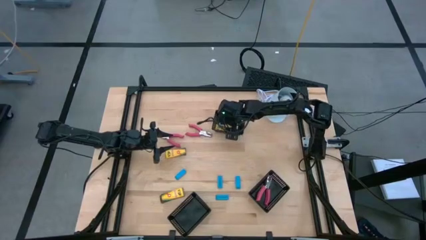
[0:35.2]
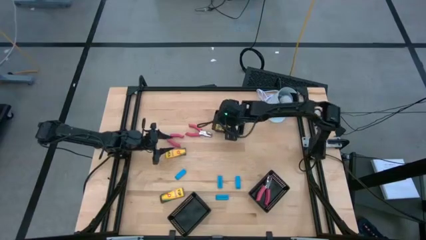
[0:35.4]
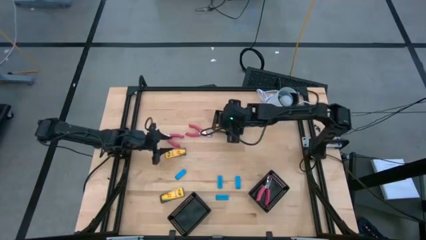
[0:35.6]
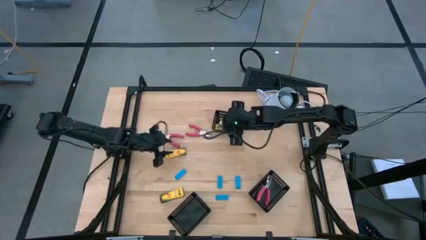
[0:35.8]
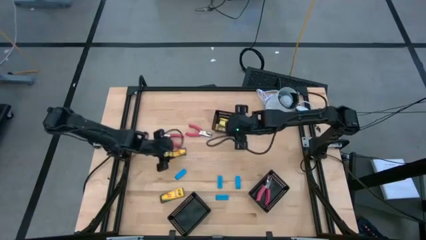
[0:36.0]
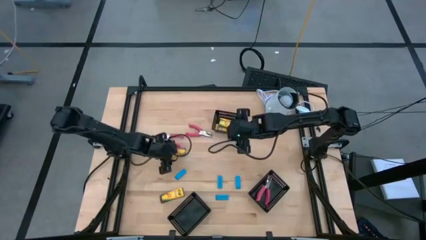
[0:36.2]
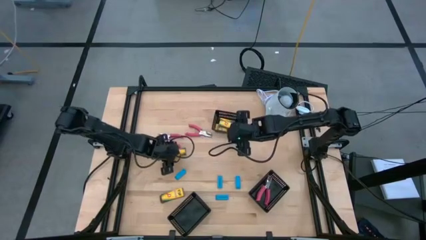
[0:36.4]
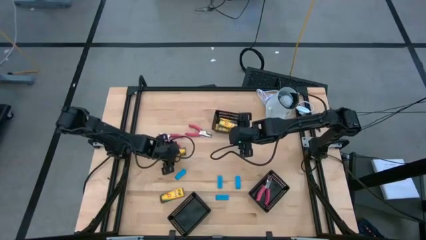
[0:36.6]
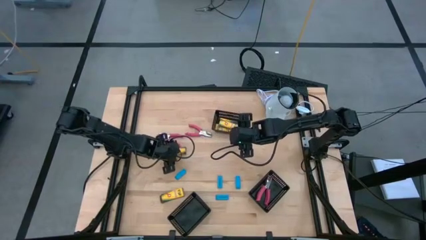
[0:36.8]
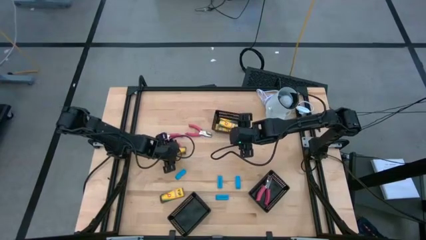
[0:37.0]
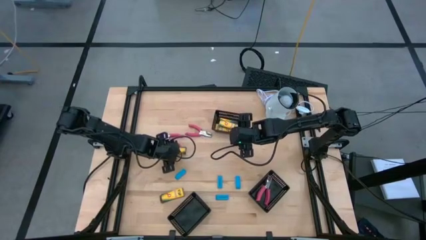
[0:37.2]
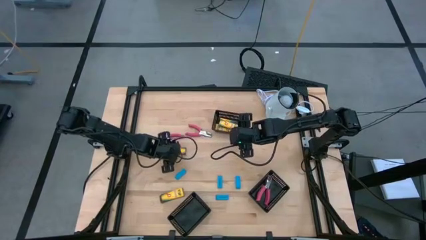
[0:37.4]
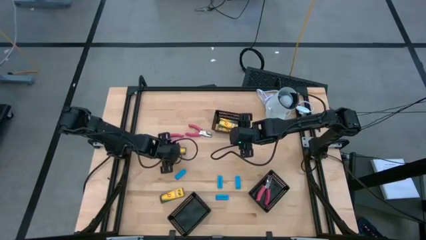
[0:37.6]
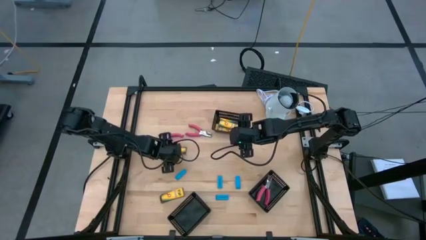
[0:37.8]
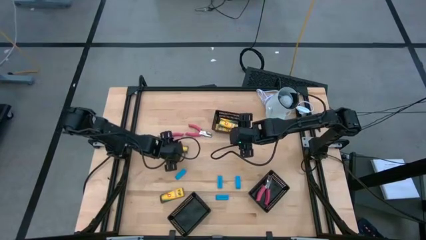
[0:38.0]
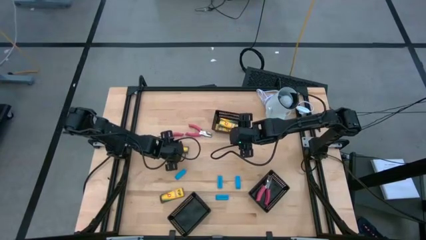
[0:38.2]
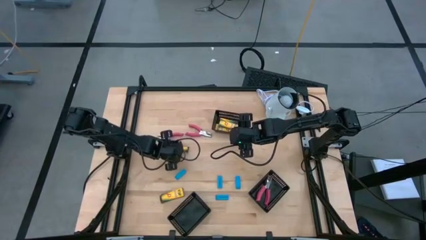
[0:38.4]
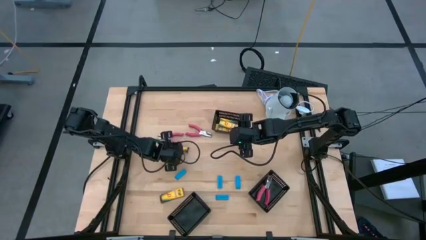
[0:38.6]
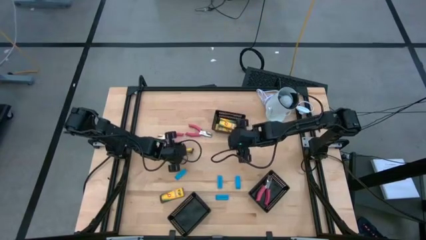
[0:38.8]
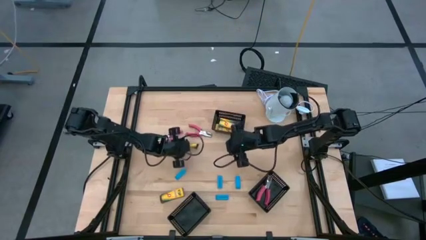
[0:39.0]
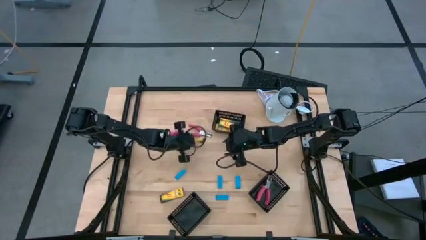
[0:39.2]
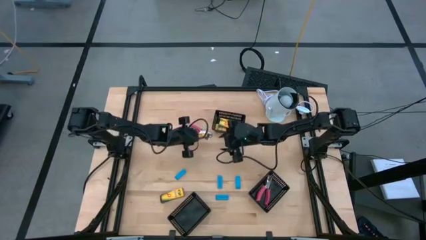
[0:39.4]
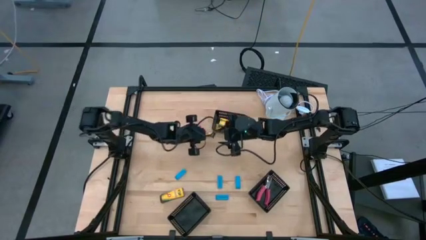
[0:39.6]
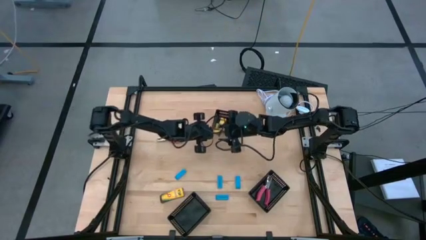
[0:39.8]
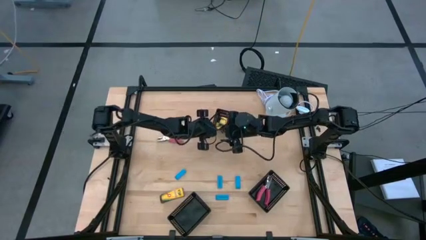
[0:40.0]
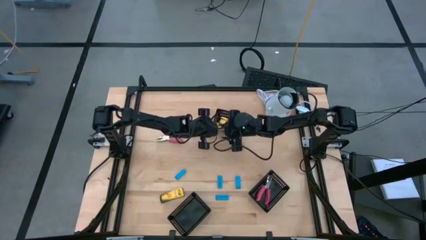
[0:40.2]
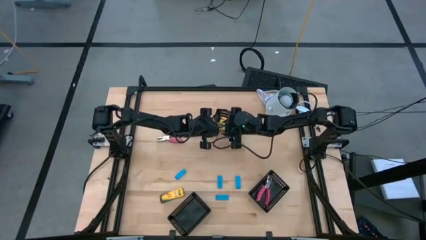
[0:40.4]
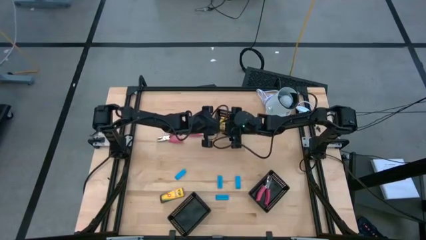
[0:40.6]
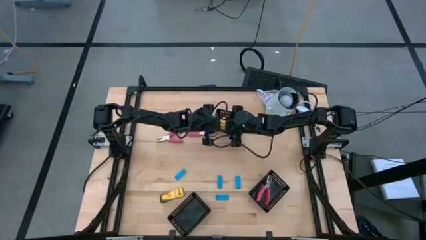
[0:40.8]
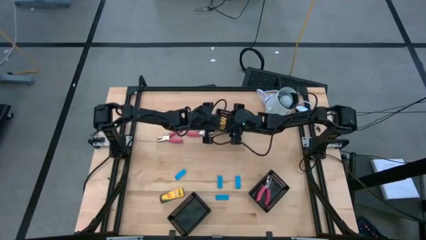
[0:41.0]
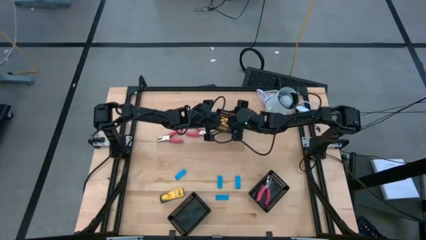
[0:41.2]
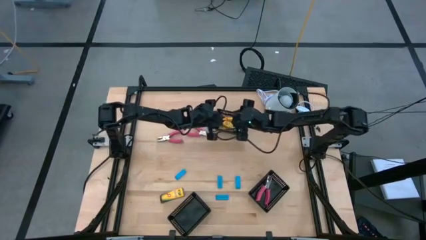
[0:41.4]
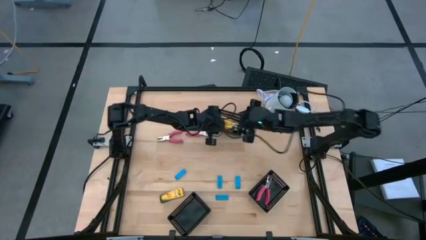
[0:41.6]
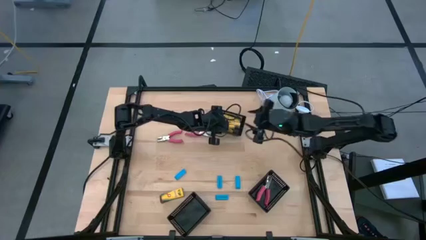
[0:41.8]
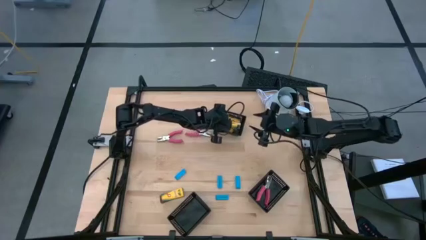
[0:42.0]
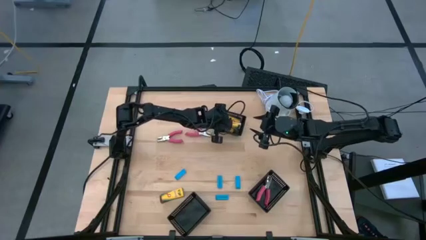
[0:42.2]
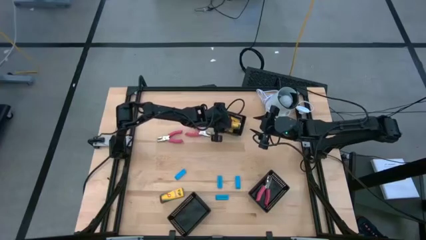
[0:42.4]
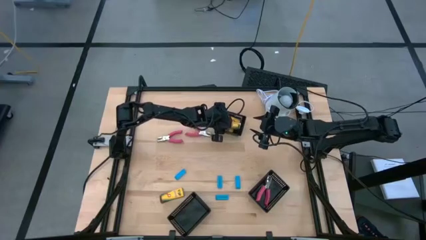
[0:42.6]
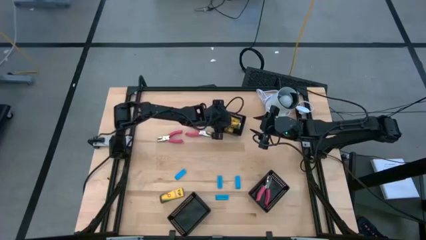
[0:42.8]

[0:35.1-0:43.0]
Task: Pick & Place School Supplies
Put the yellow crayon box into the top black bin

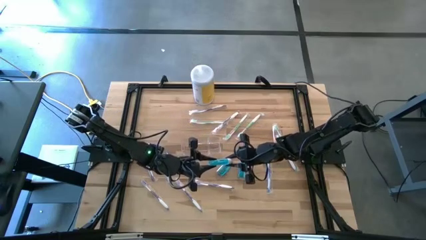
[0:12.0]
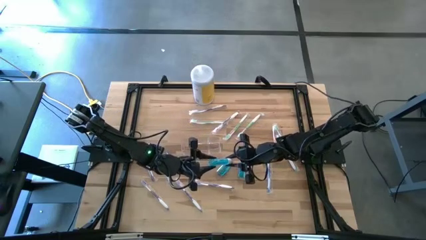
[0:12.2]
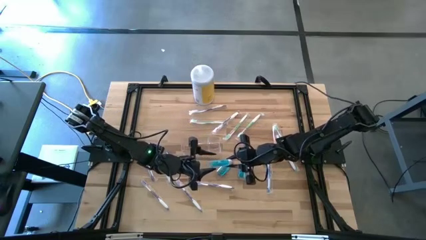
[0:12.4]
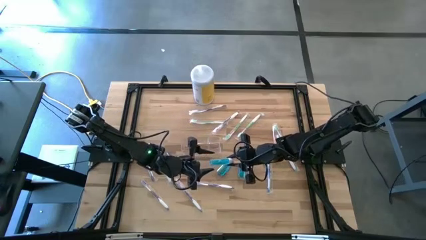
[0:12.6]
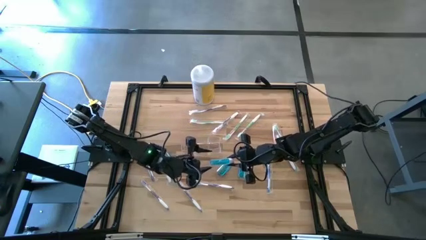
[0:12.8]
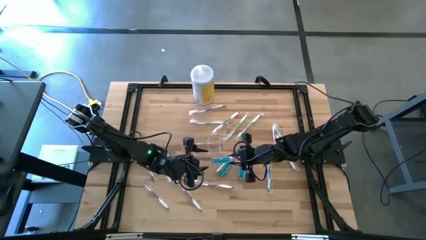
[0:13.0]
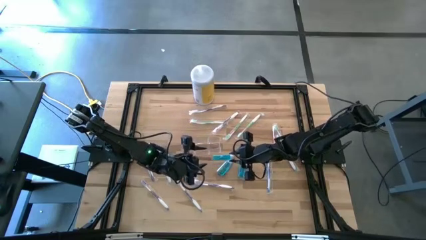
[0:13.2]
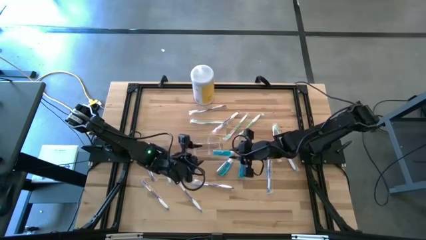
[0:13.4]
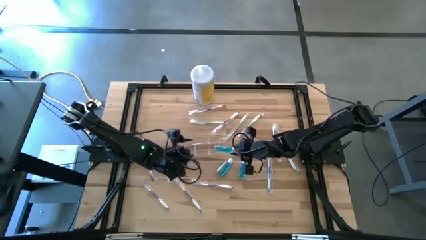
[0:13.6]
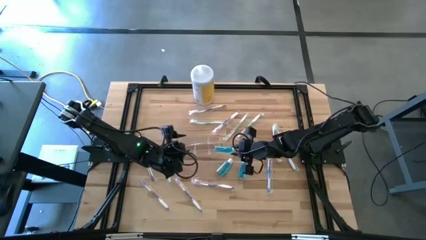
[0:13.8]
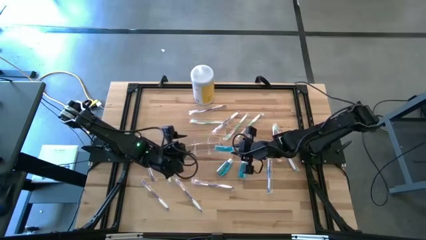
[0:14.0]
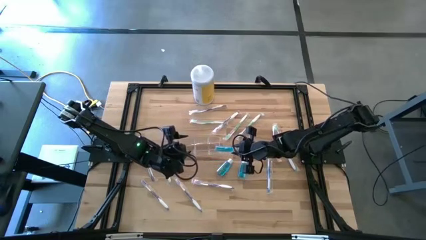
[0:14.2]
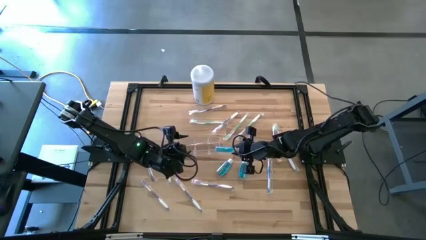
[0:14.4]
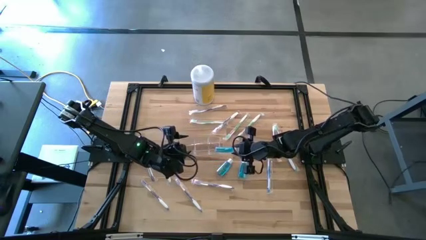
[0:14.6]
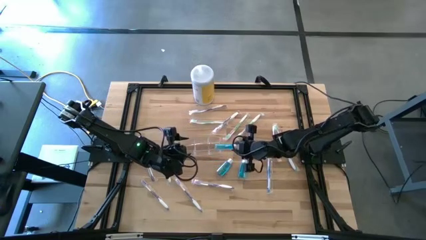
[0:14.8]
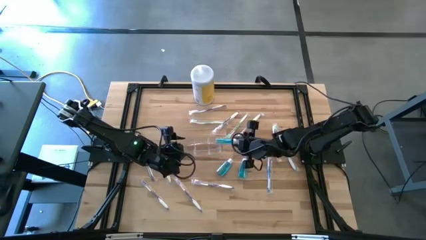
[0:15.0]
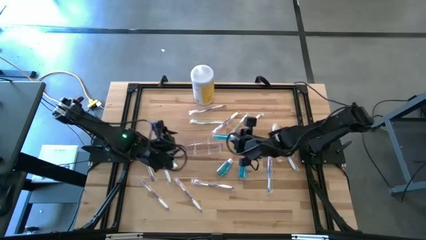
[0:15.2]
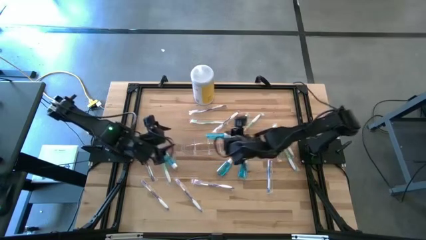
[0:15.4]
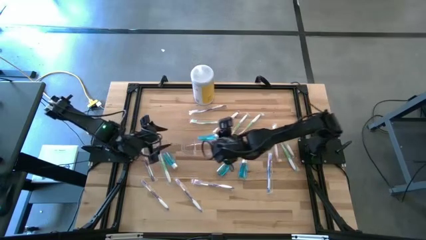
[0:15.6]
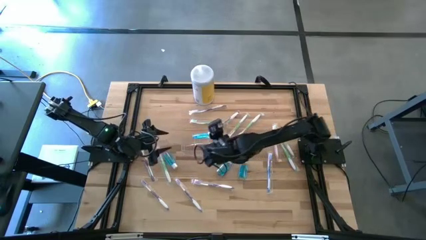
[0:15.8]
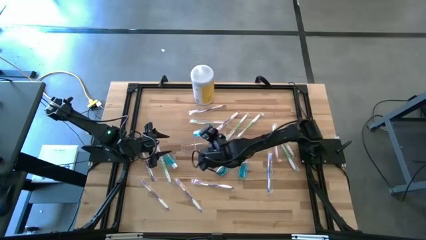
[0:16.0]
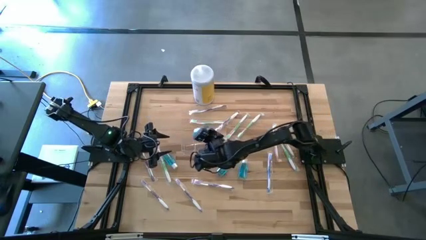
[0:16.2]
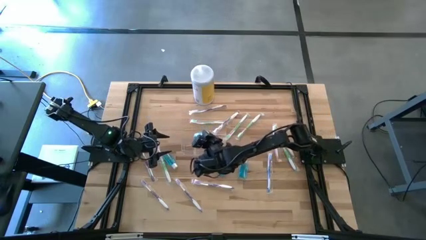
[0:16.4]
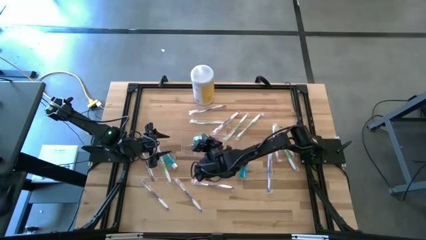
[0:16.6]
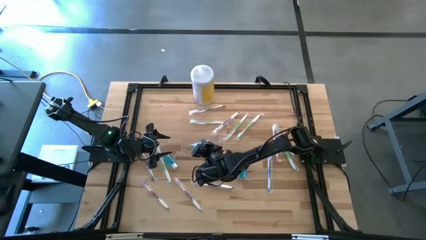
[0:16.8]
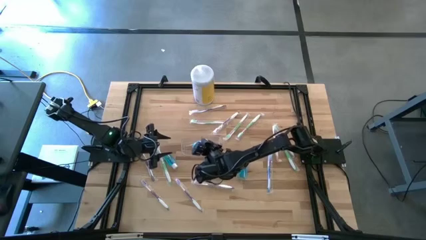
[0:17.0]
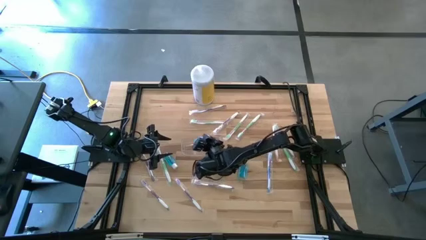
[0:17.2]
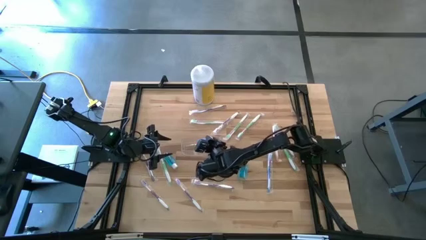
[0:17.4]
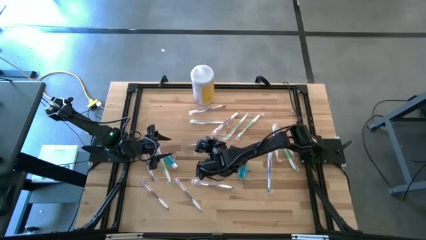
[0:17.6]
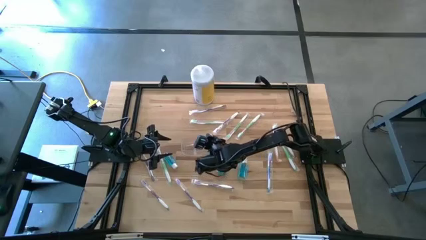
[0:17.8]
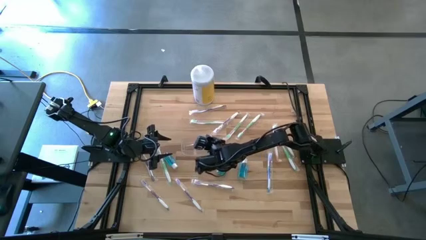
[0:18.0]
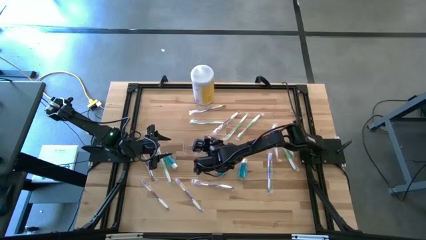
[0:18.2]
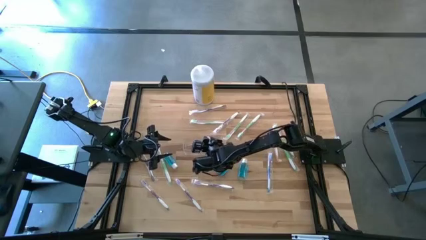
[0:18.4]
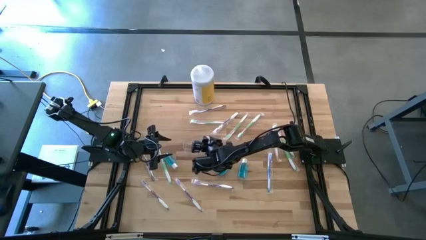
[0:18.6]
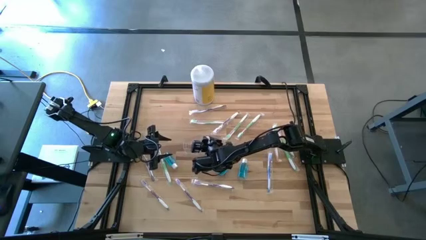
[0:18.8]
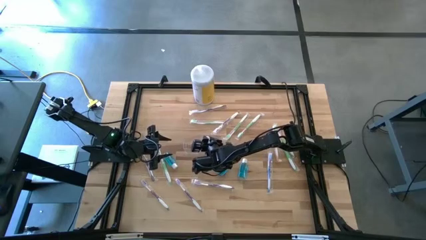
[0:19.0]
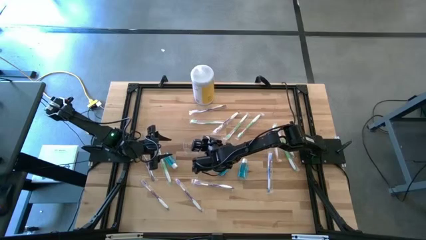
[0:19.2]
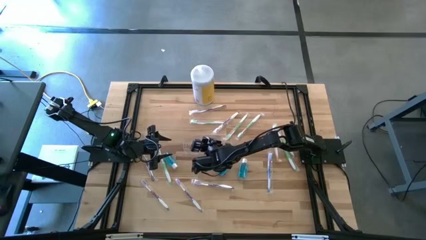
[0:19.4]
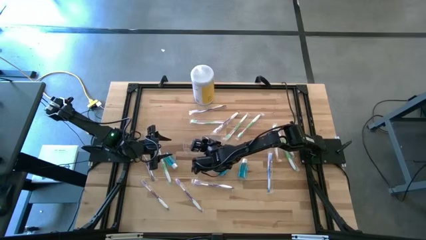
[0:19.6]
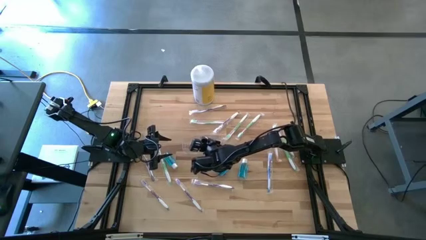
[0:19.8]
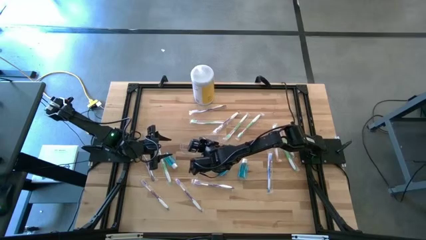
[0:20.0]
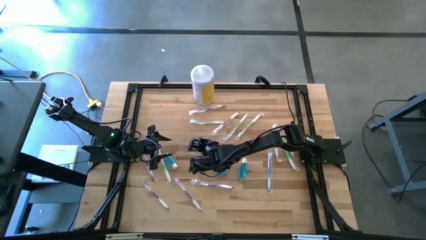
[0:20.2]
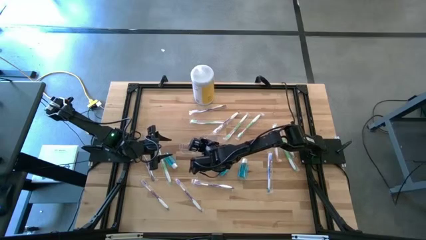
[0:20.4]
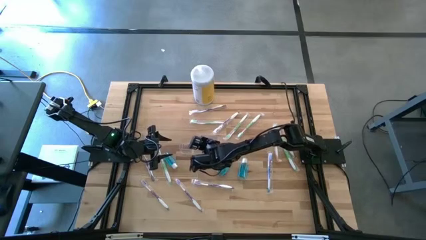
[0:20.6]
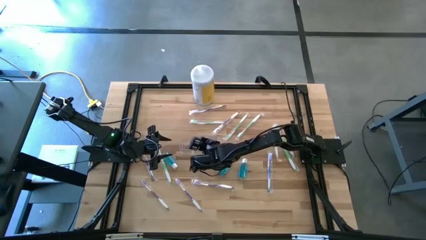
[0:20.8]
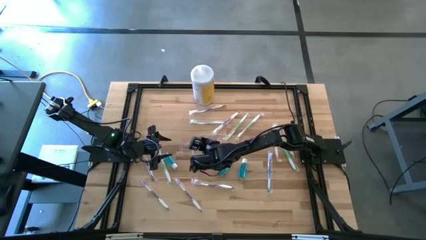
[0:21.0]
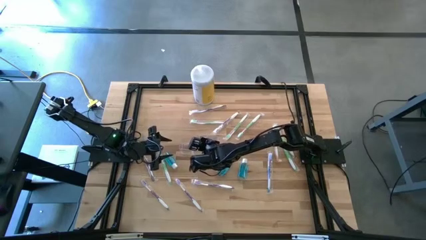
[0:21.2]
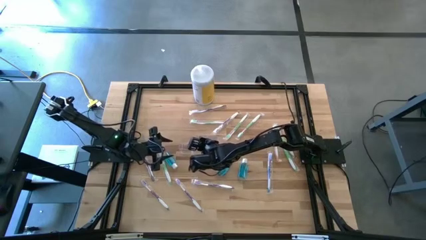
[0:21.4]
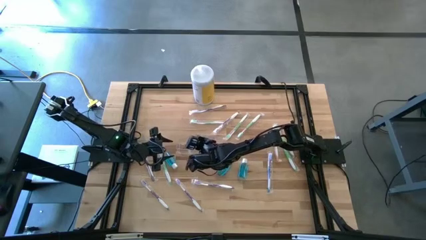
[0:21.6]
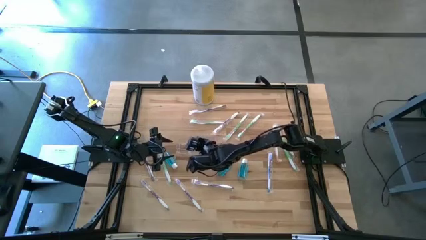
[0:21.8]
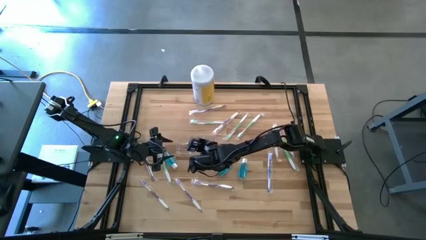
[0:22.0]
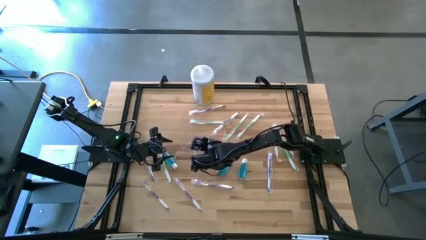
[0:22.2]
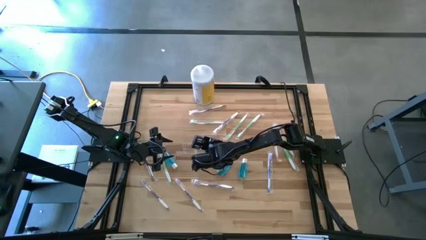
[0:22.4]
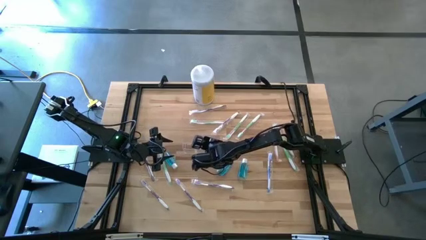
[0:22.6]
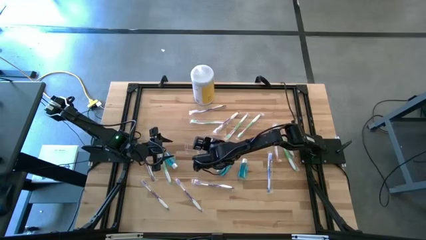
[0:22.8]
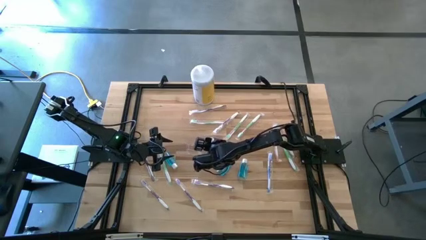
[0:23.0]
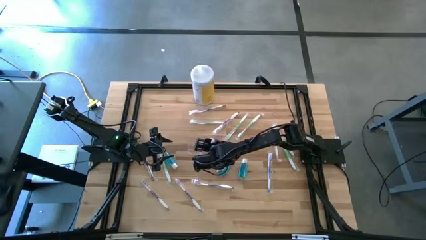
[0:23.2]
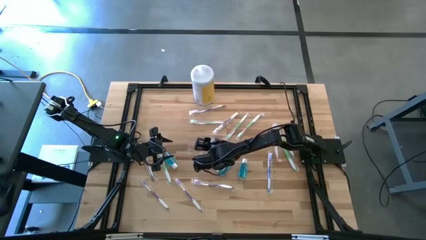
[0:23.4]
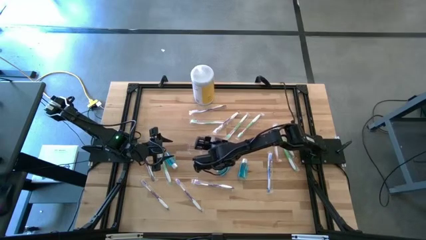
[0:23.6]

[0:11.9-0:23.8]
Task: Pick & Place toothbrushing station
Put the mouthwash bottle into the transparent organizer
